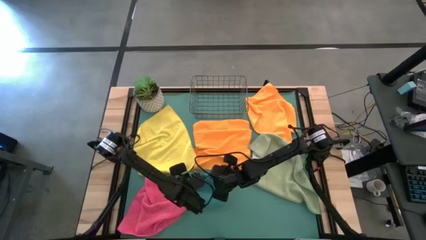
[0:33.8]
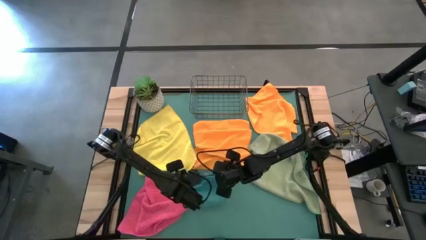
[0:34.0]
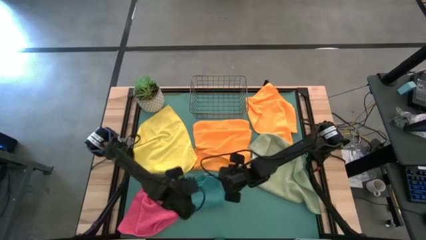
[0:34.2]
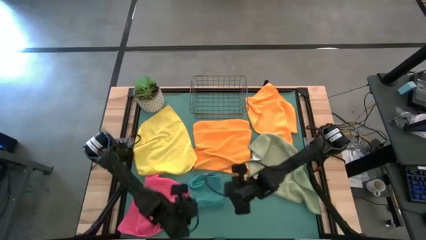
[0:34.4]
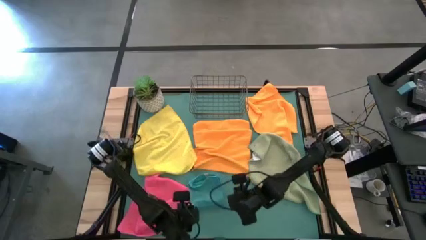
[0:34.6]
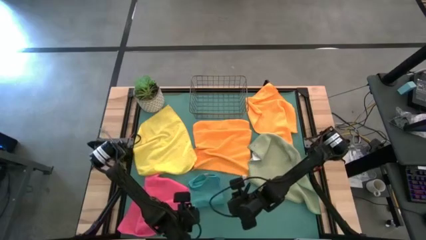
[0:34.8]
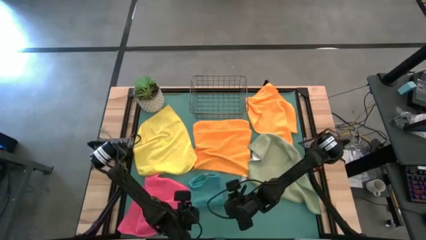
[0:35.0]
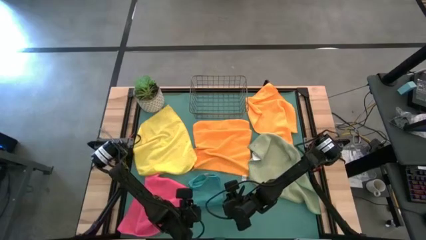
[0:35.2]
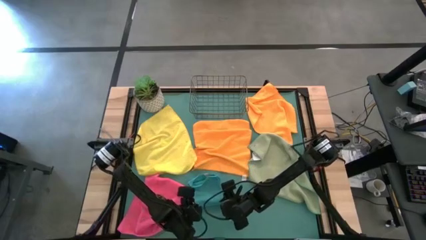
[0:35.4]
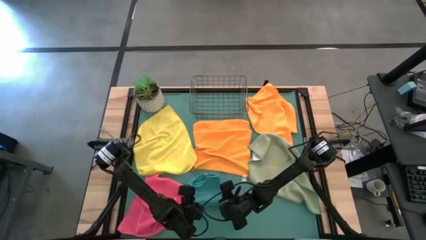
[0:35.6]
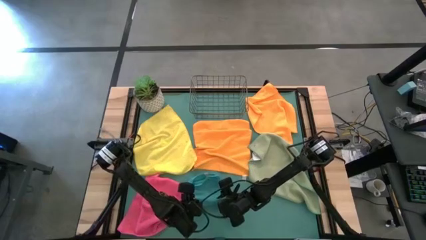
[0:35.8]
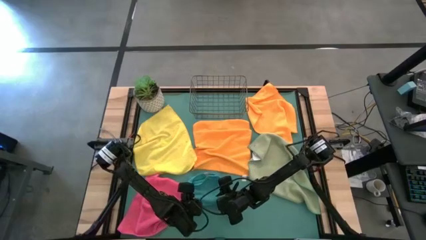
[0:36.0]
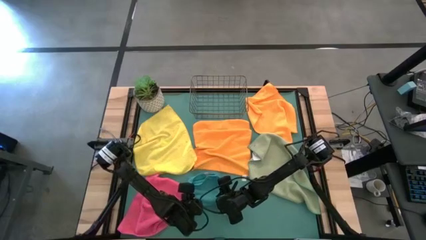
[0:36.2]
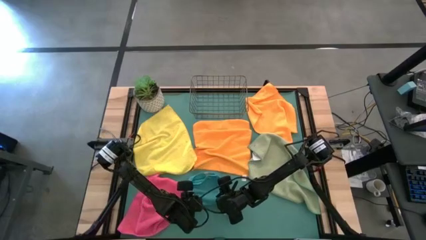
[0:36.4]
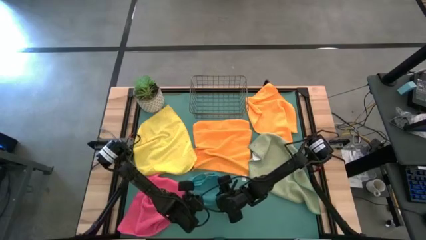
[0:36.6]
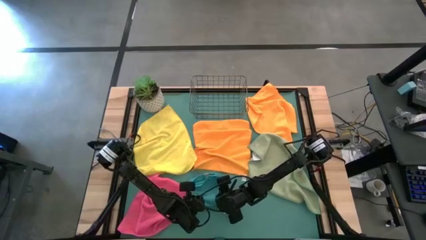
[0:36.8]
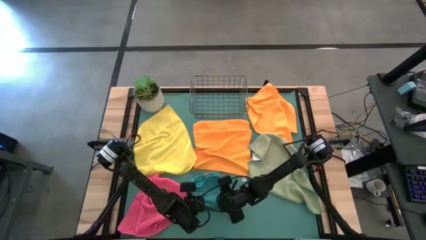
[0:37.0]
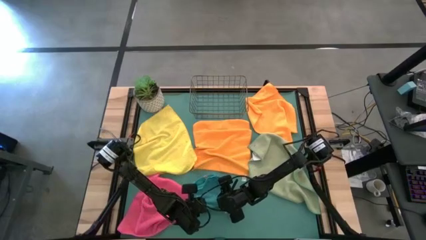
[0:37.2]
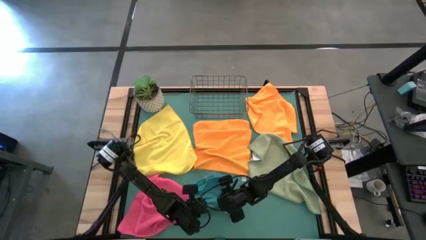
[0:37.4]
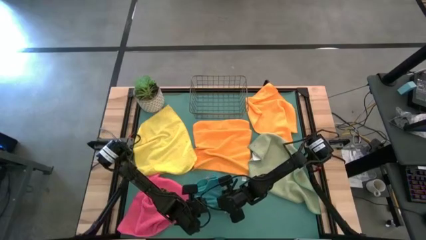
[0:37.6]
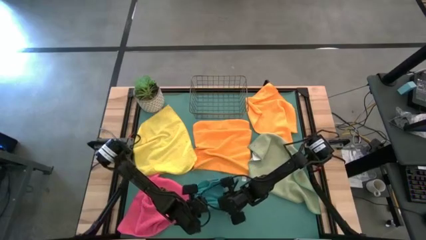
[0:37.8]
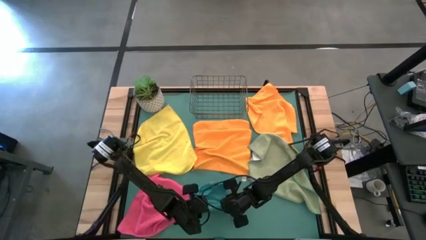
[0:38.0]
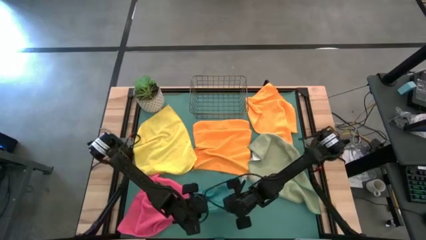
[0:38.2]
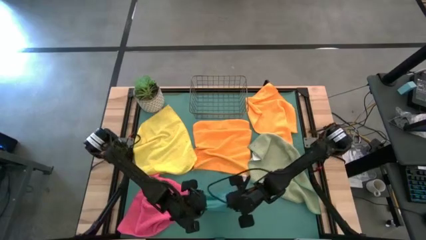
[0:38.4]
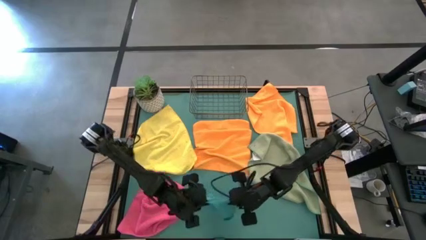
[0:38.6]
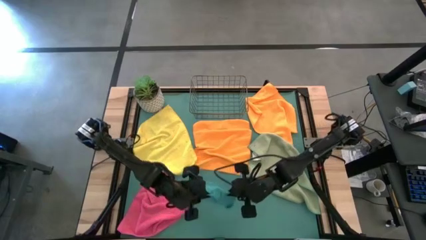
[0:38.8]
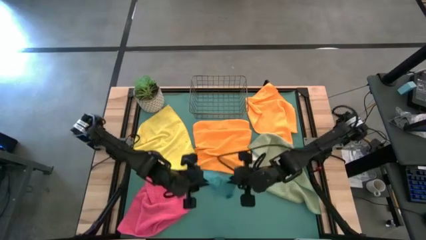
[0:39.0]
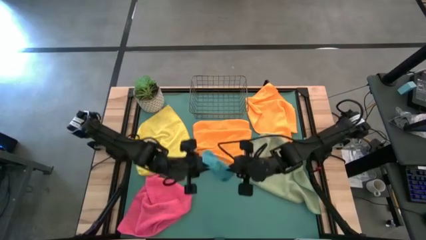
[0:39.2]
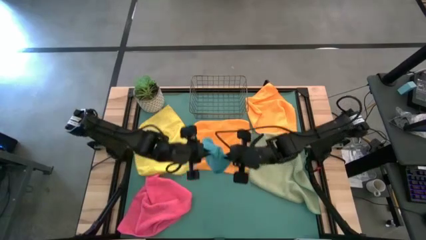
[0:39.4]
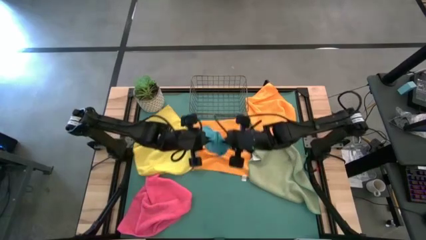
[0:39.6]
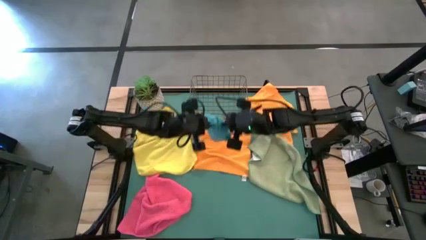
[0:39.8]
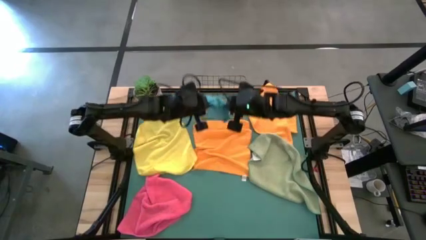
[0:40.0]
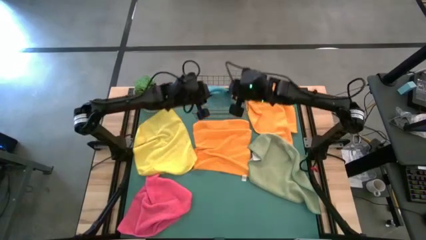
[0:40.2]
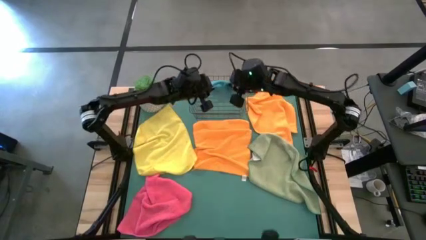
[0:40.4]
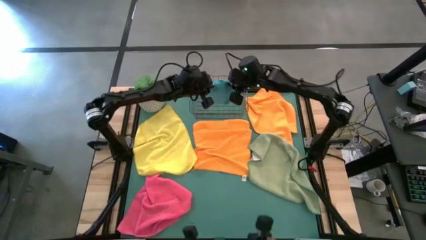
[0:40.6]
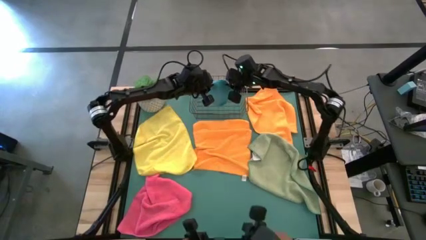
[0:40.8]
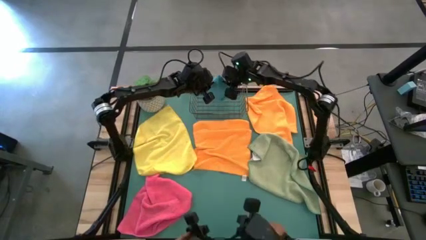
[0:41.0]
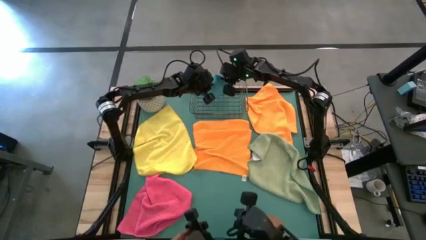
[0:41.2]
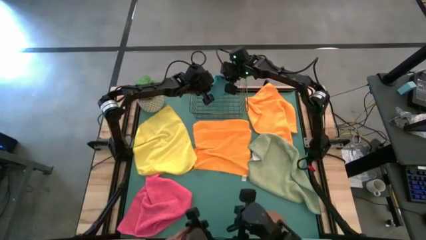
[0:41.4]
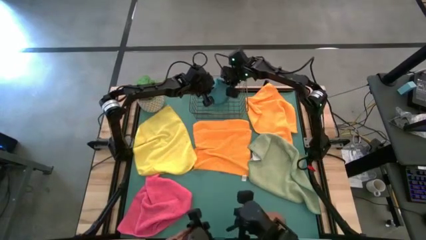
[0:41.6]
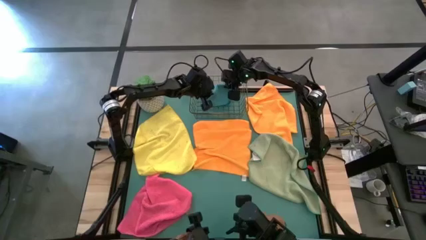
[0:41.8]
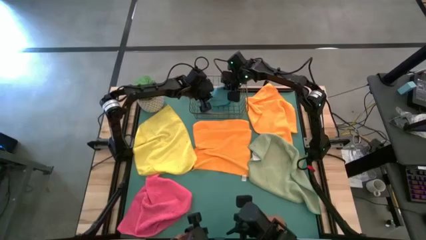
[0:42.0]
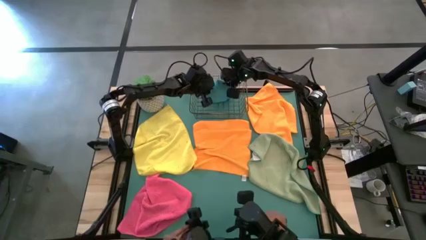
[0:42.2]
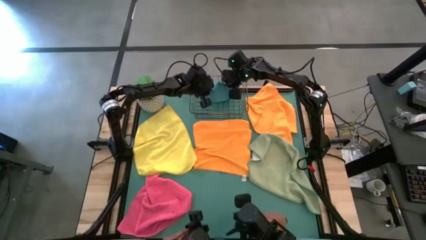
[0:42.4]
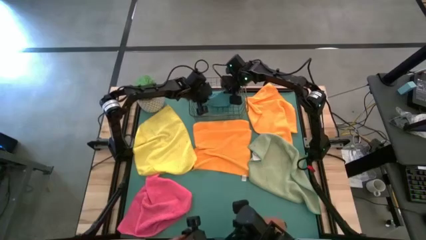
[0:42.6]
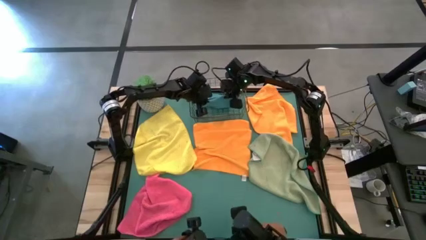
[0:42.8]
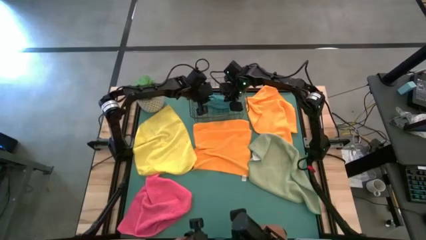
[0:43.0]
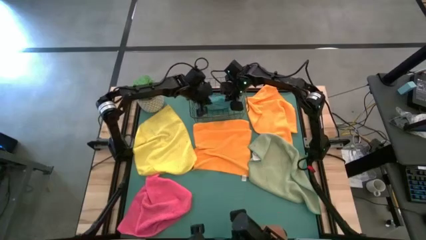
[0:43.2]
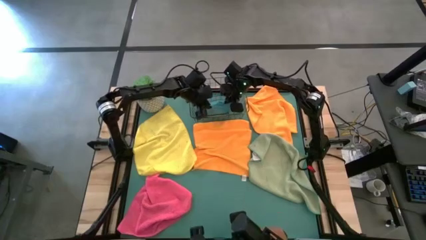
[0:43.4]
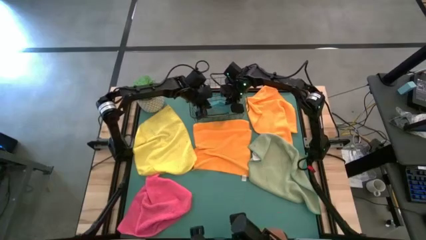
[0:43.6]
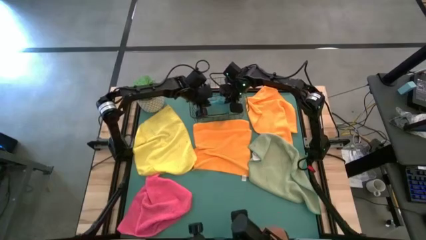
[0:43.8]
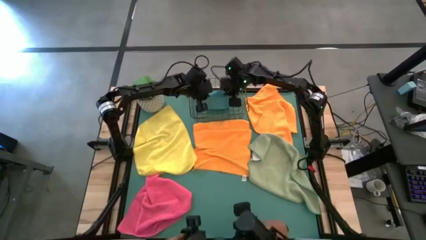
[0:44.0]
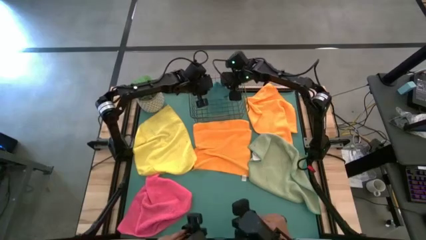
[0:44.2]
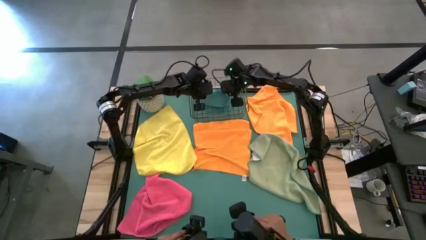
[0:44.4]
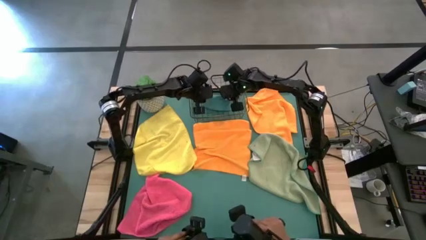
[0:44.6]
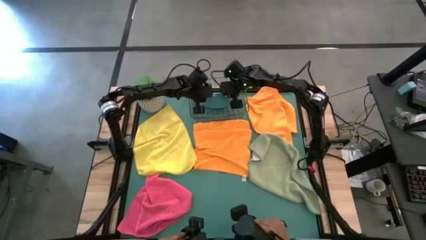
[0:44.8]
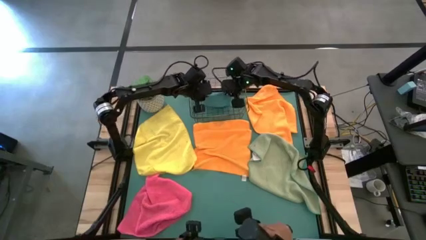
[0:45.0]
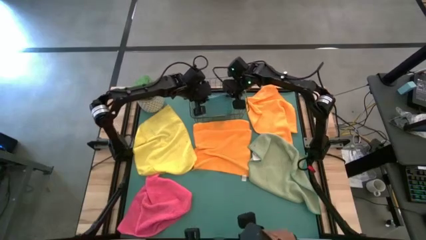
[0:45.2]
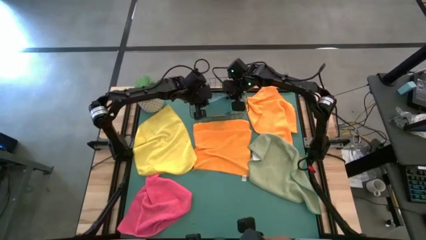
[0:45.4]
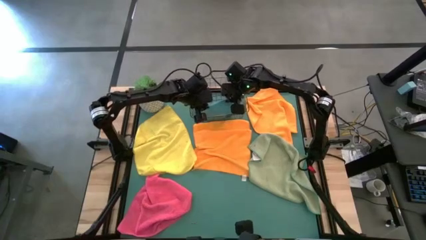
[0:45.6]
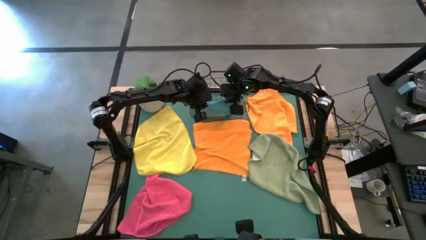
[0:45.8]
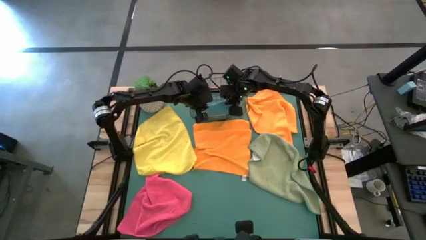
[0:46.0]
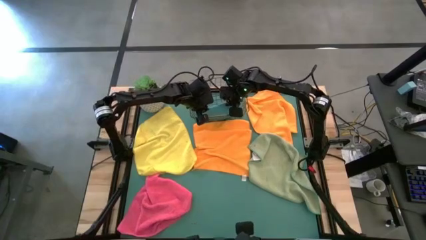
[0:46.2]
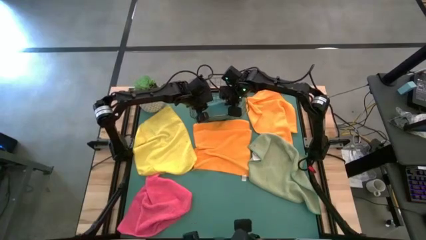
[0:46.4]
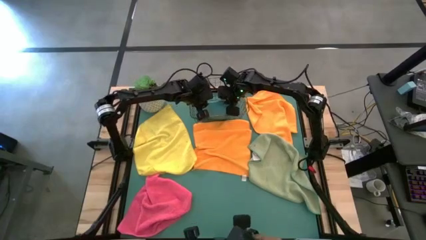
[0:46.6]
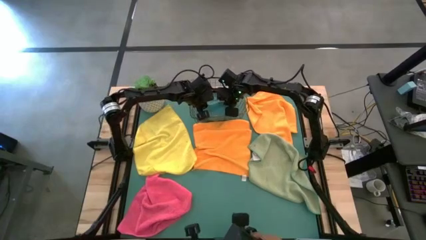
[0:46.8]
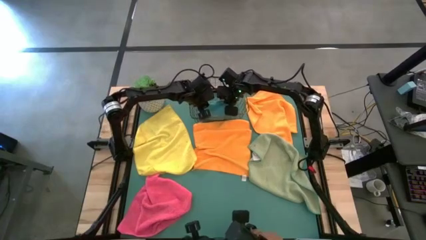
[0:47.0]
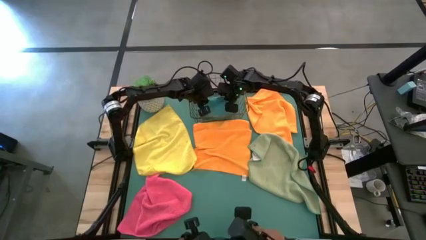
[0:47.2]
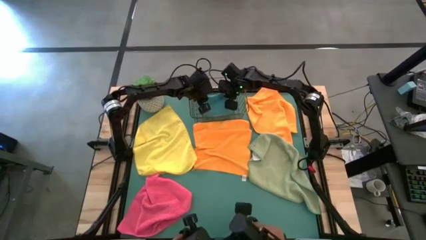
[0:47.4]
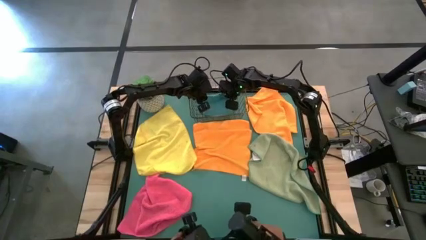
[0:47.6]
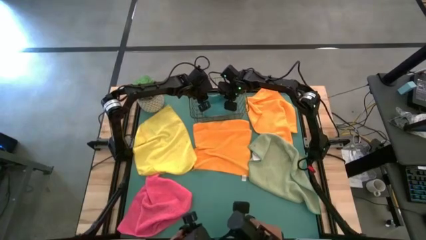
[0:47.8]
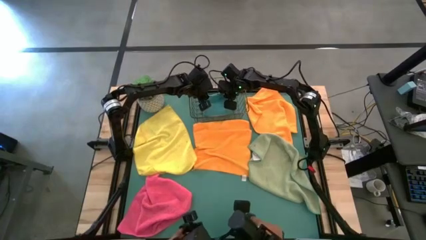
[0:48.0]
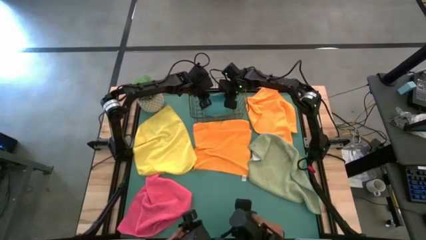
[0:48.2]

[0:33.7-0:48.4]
Task: Fold microfiber towels
Put the blue microfiber cloth into the wire basket

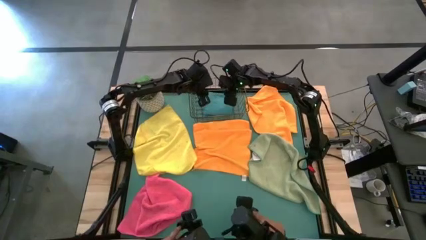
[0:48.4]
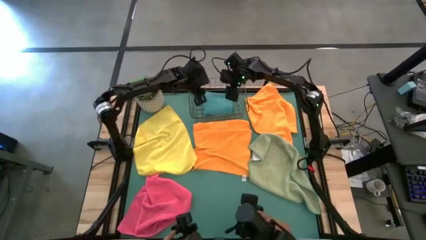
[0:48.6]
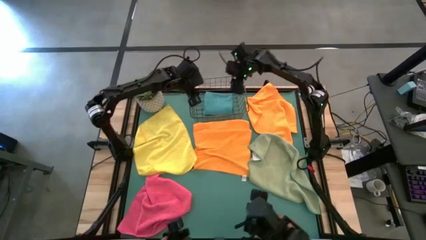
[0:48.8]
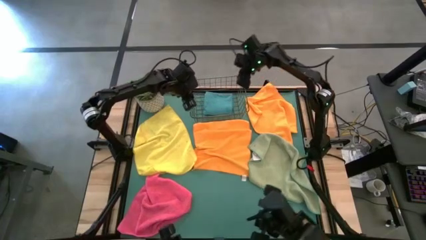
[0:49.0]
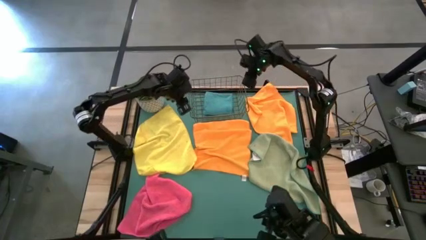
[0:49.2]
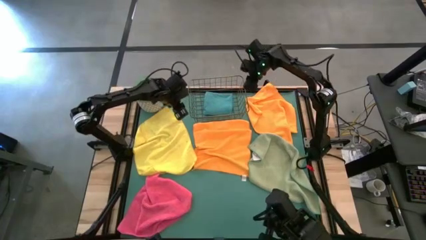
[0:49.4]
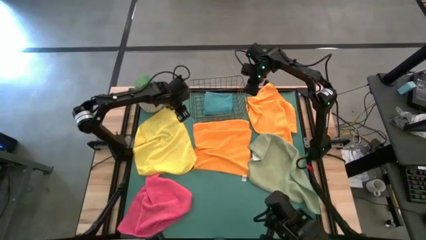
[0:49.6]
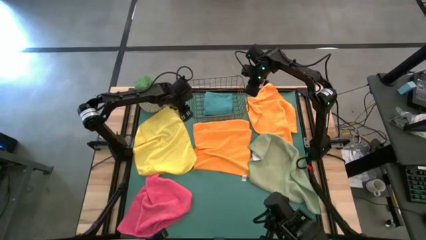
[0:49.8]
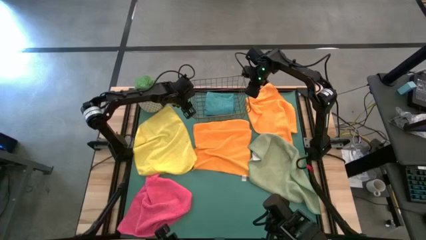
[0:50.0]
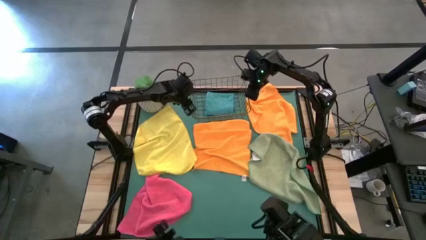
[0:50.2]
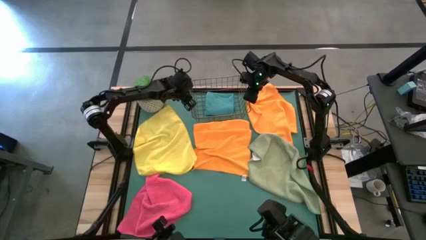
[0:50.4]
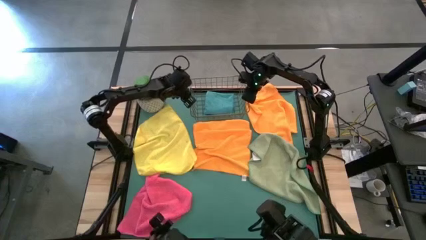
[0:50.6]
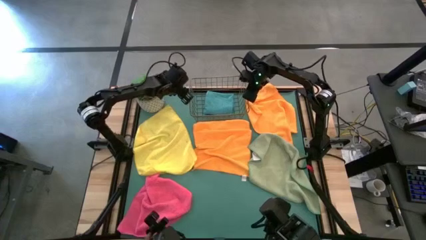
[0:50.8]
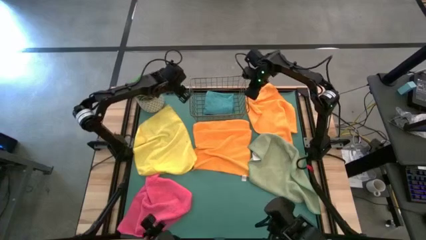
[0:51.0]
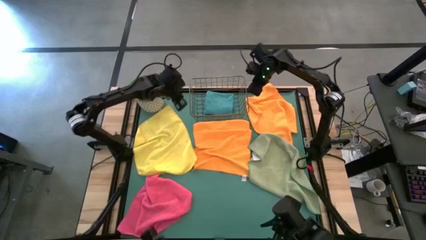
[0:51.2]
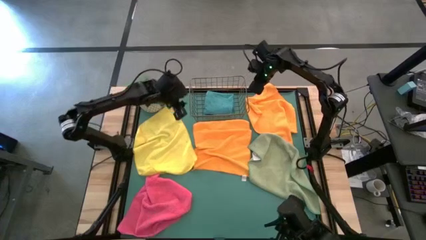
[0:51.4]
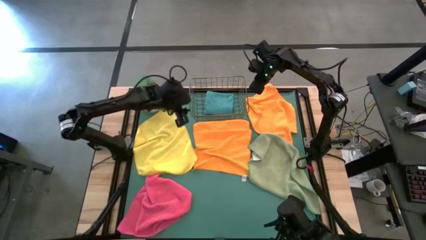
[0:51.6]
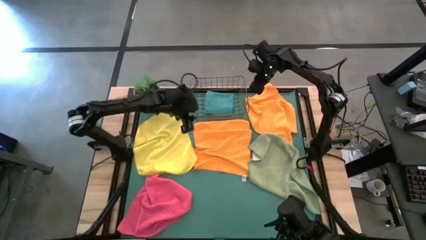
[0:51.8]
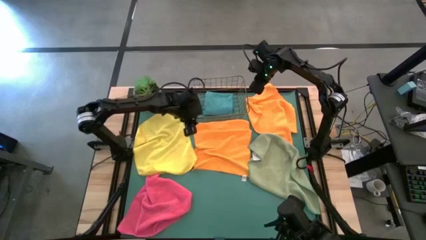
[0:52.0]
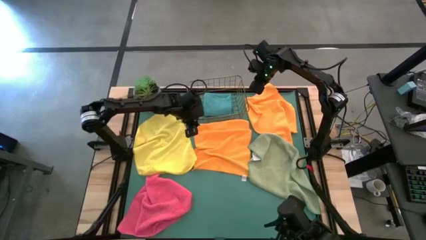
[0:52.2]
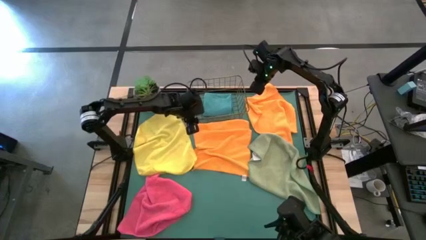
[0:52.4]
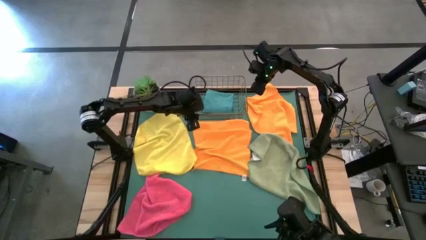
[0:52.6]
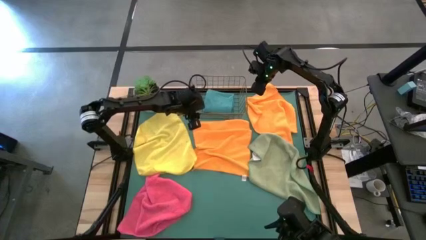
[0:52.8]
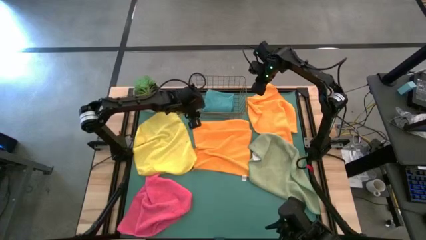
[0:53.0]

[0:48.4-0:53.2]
Adjust the wire basket
